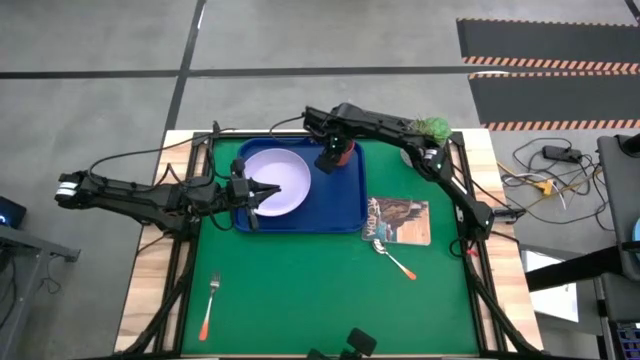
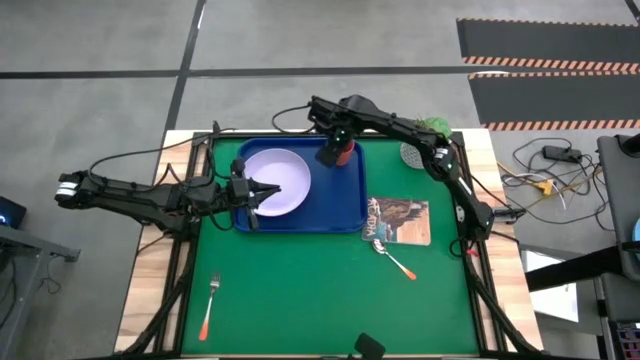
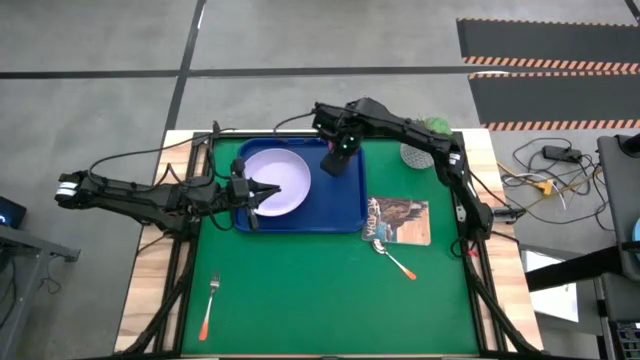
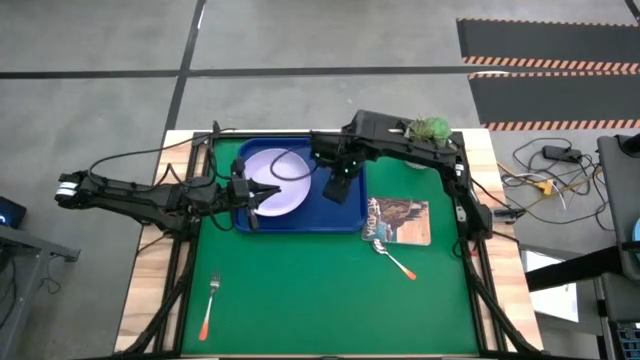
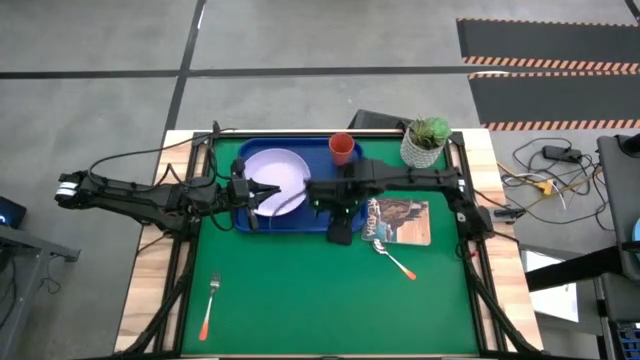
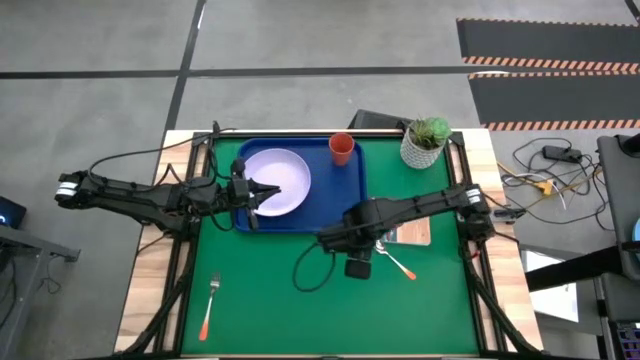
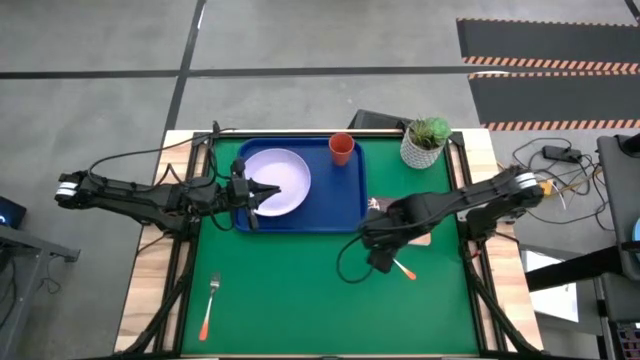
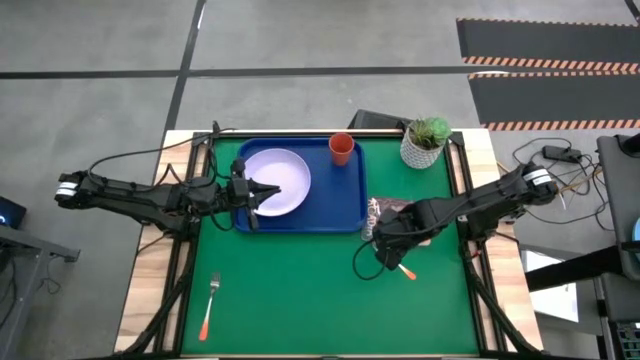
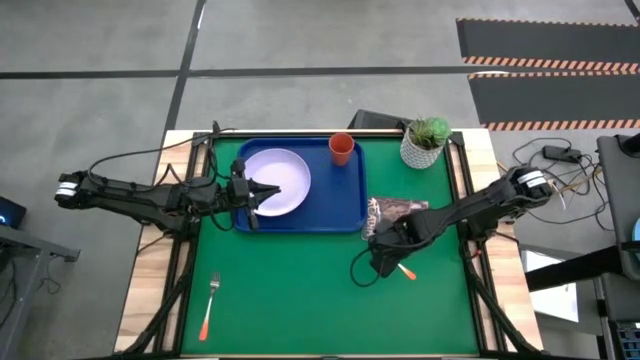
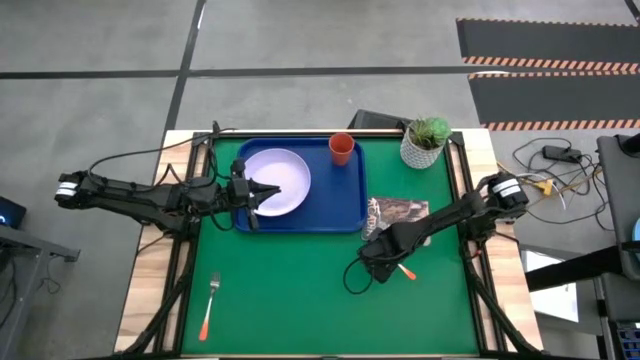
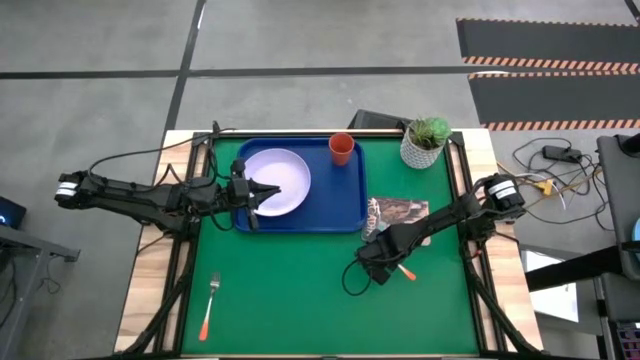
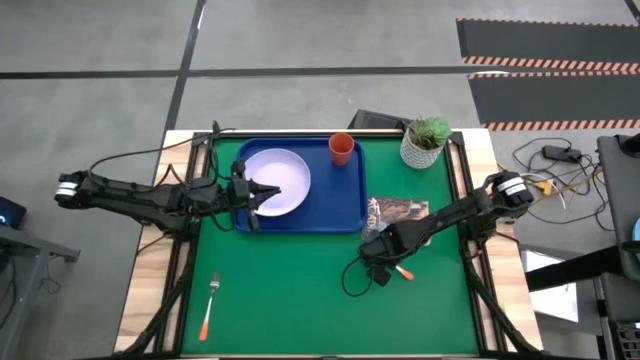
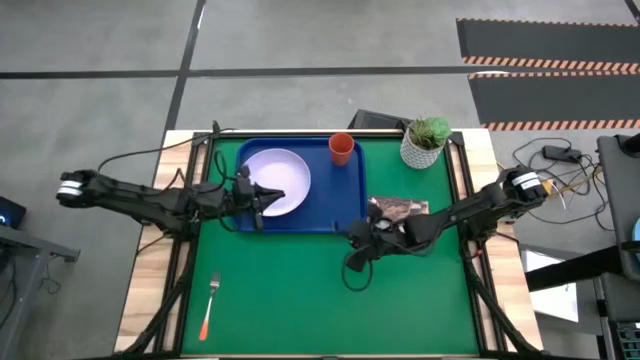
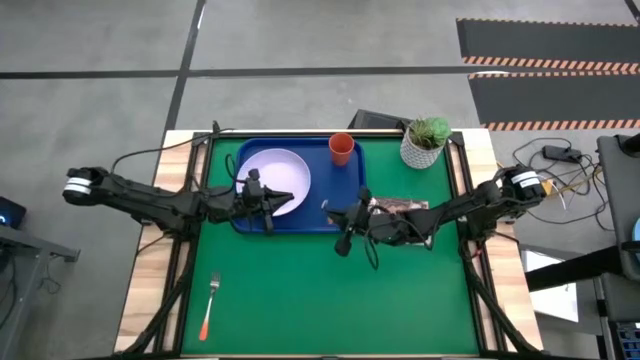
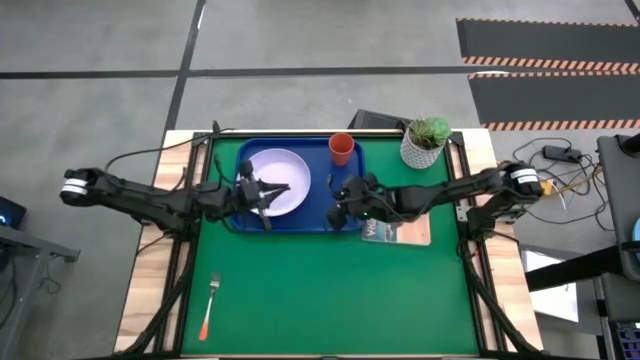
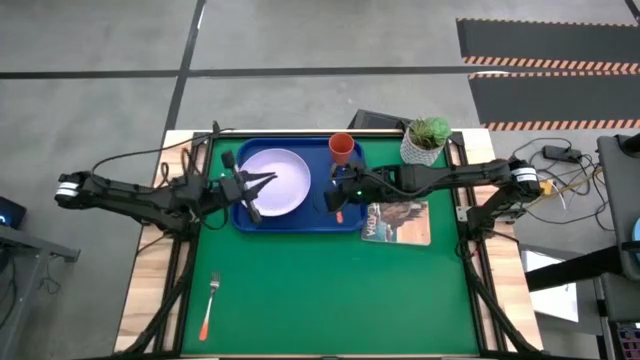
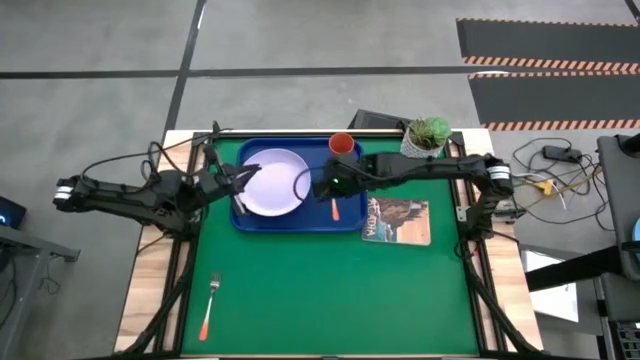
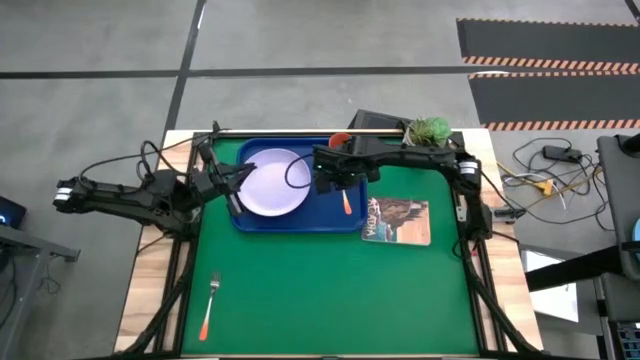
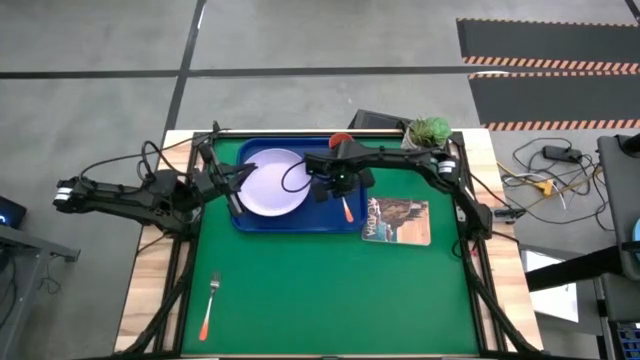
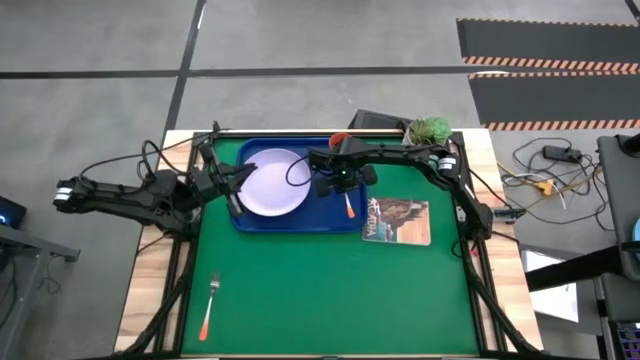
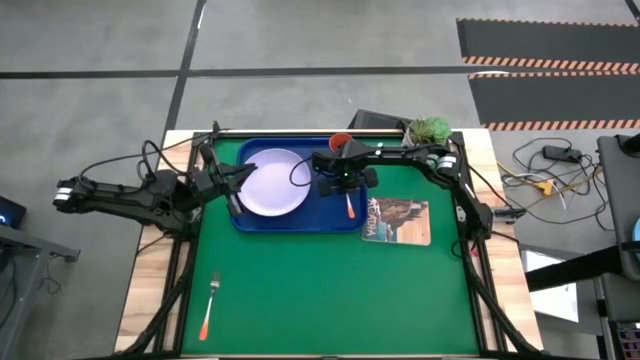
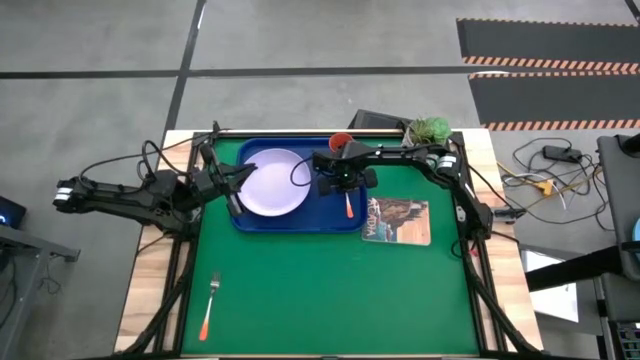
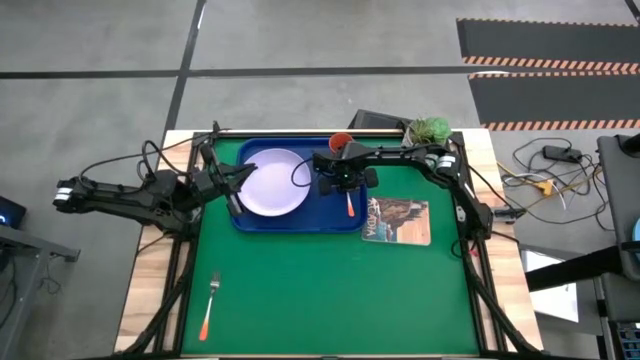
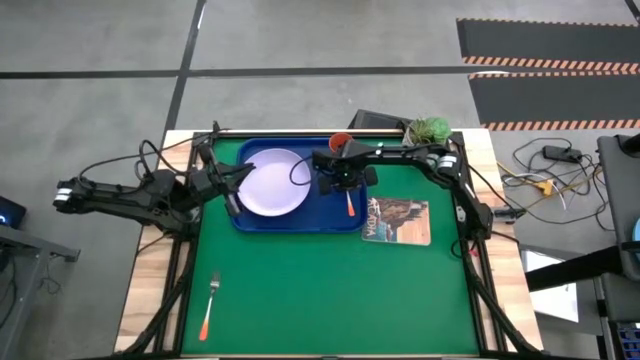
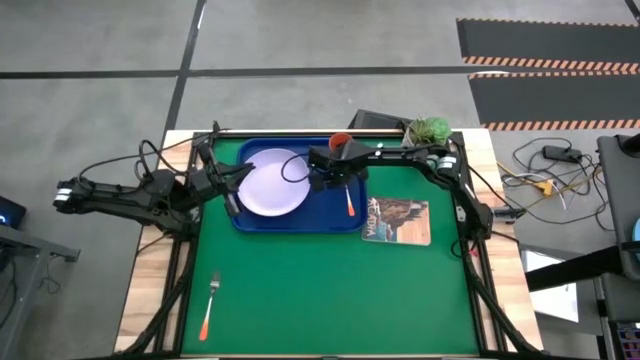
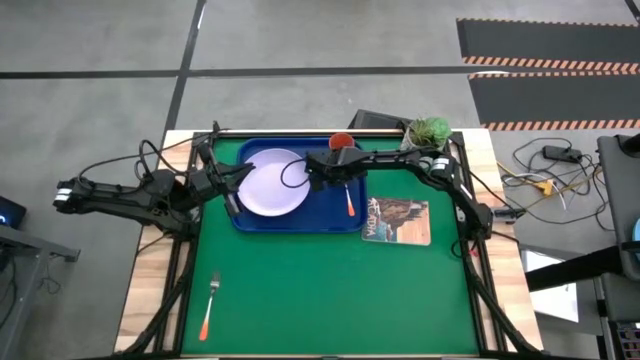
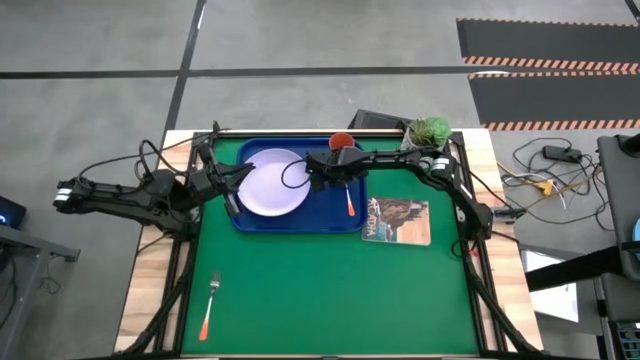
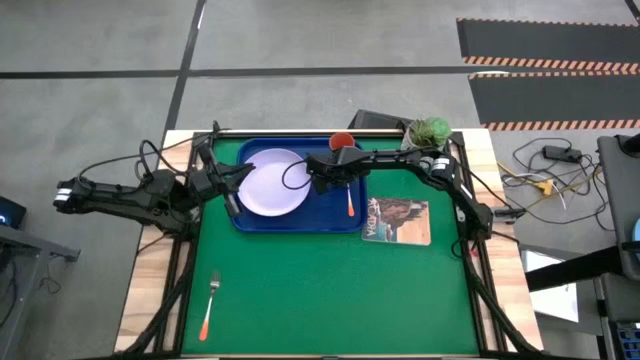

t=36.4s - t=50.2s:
Task: Pick and place plate/cup/fork/spoon on tray
Put the orange spoon on the blue serving tray to the right of the white plate

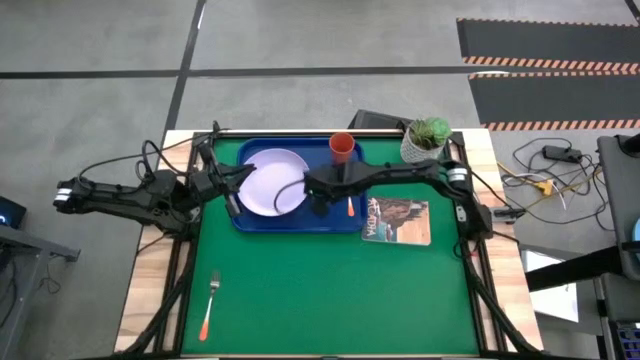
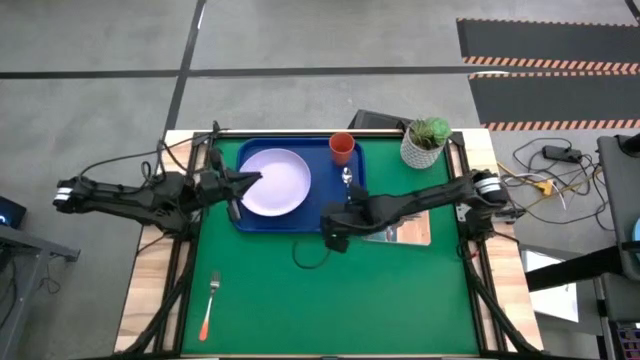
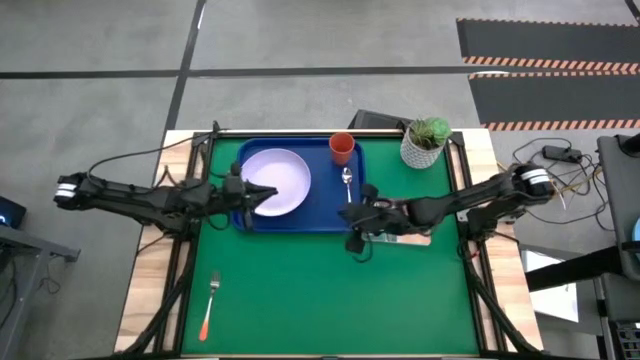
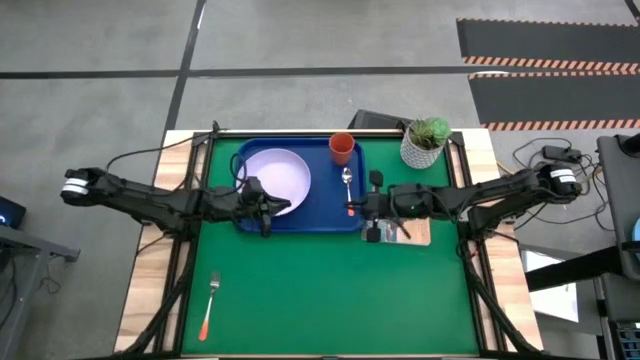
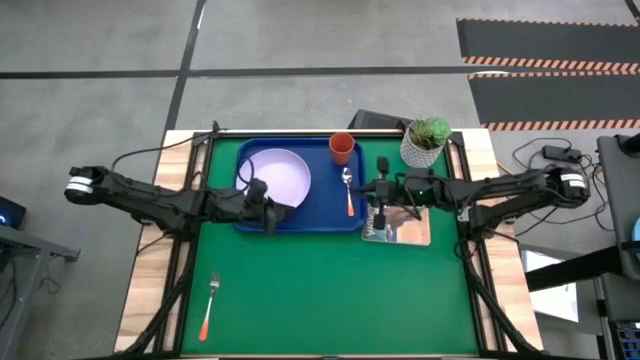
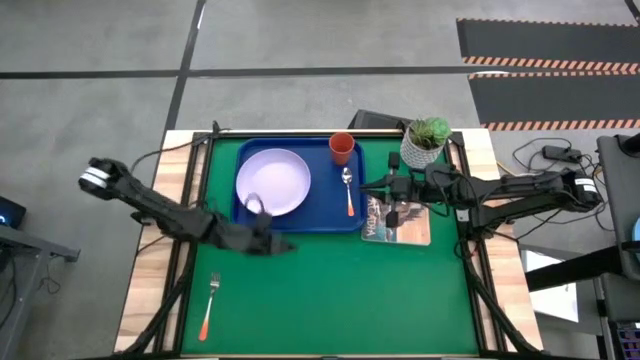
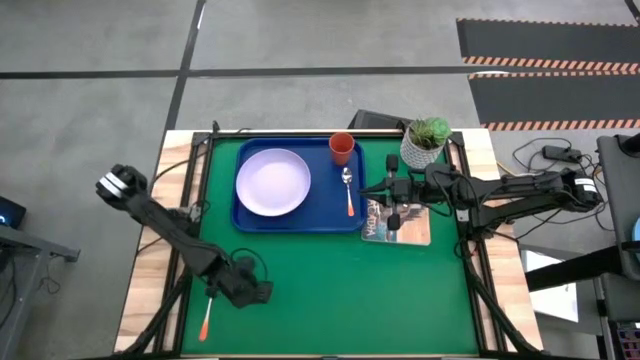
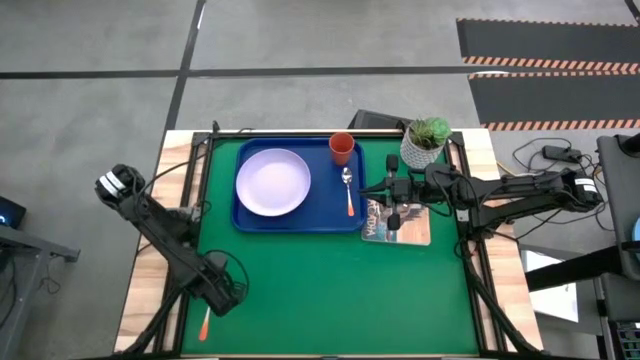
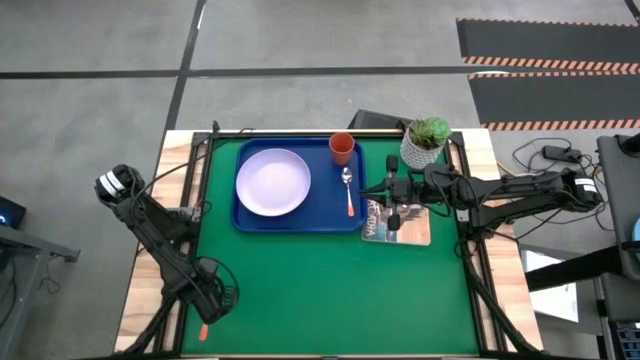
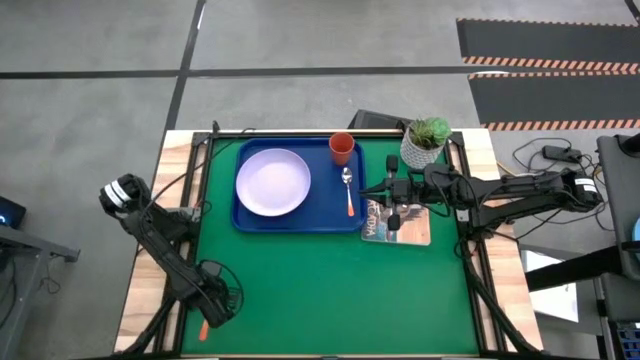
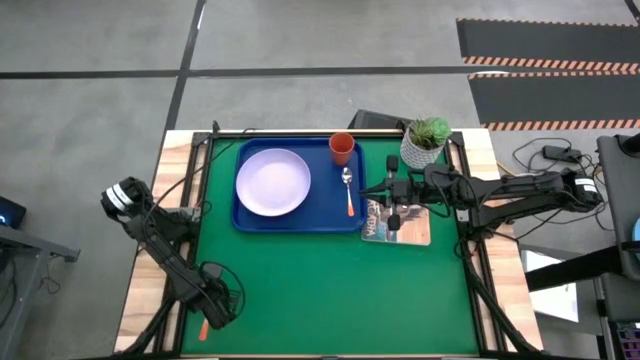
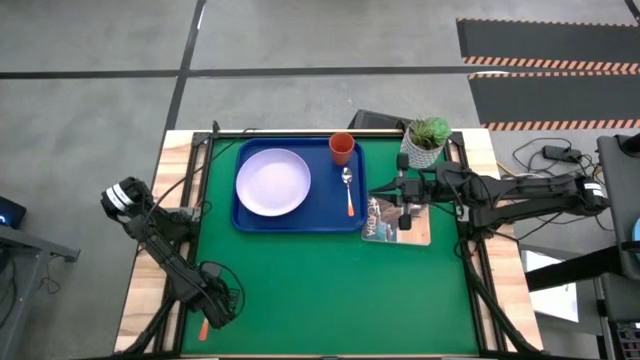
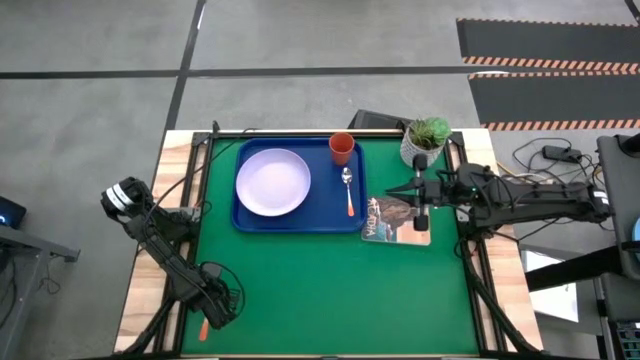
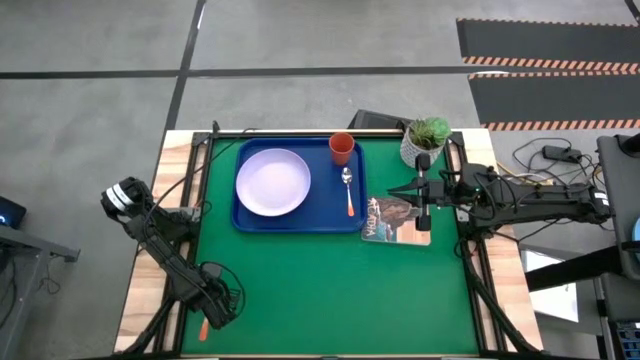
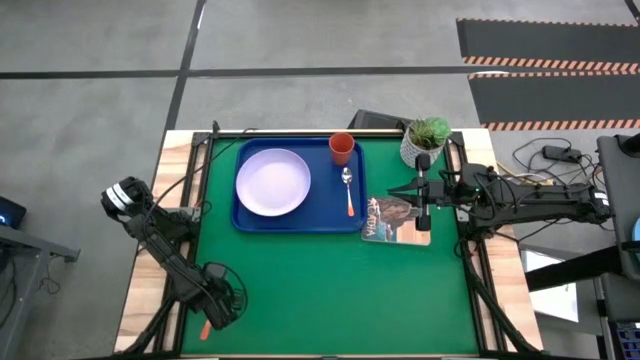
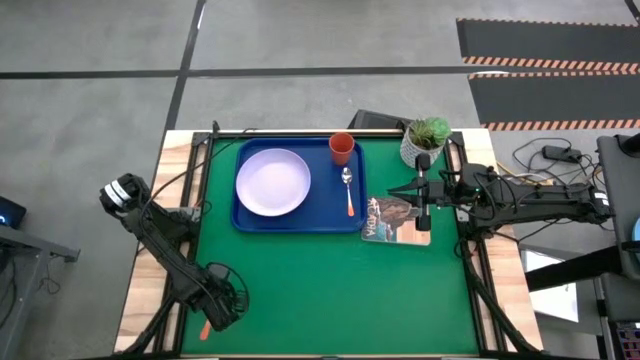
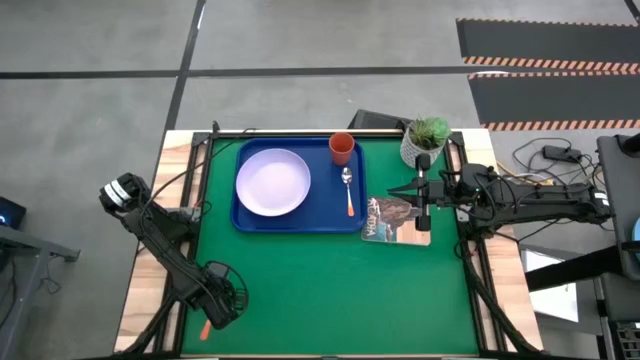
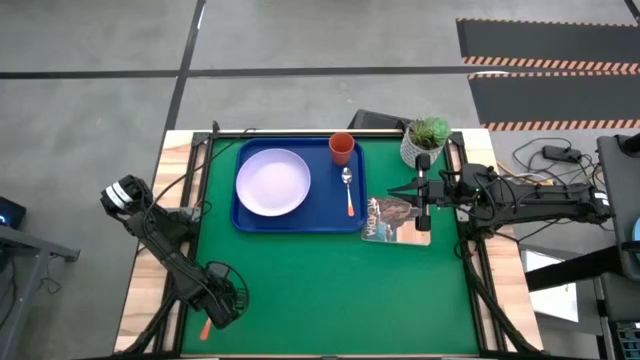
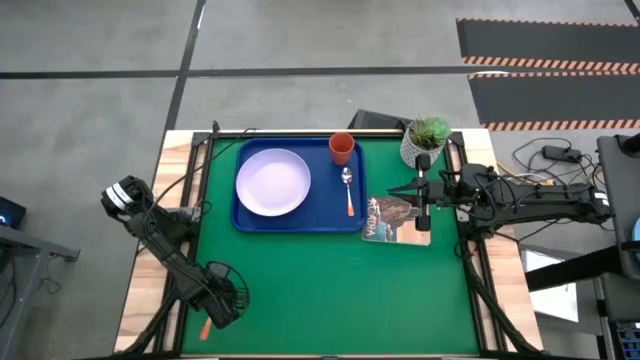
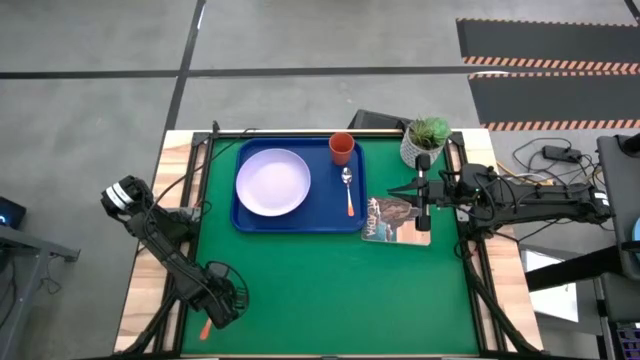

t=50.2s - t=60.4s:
Put the orange fork on the blue serving tray to the left of the orange spoon
